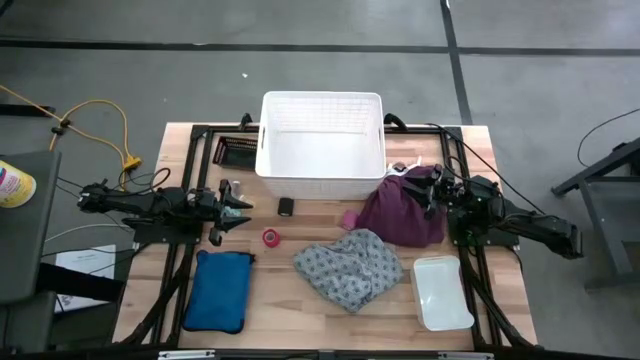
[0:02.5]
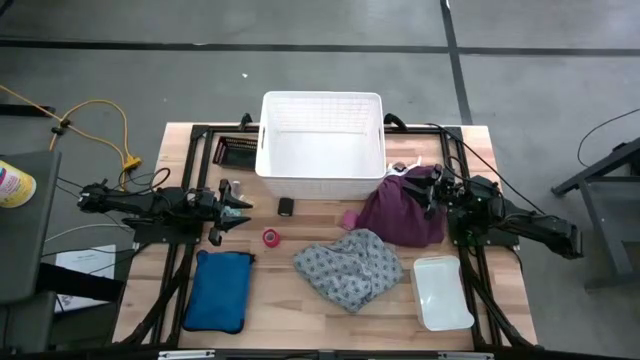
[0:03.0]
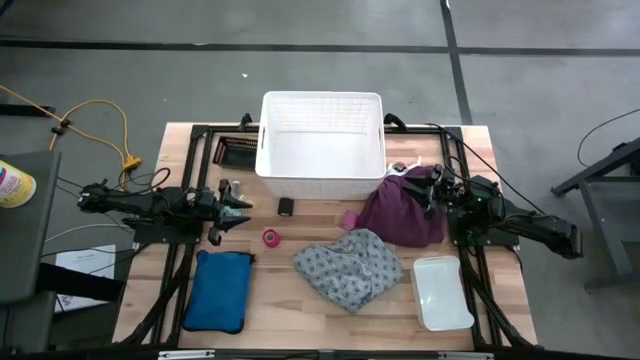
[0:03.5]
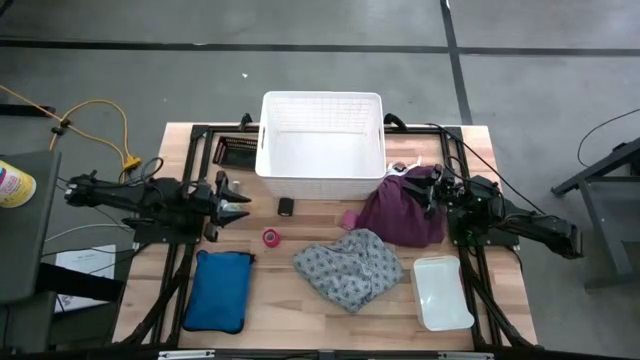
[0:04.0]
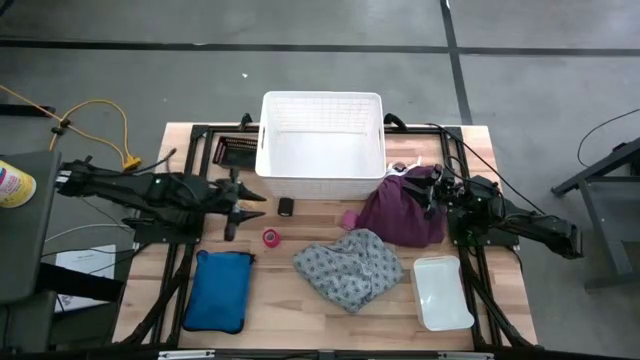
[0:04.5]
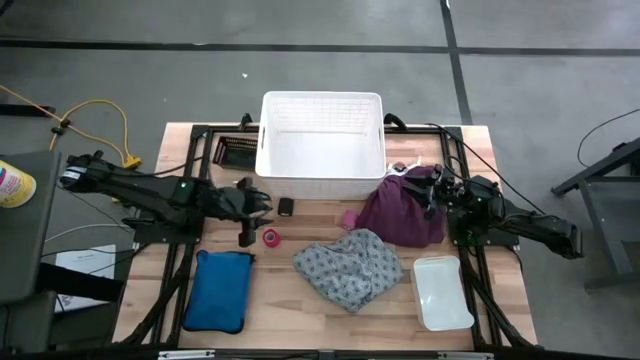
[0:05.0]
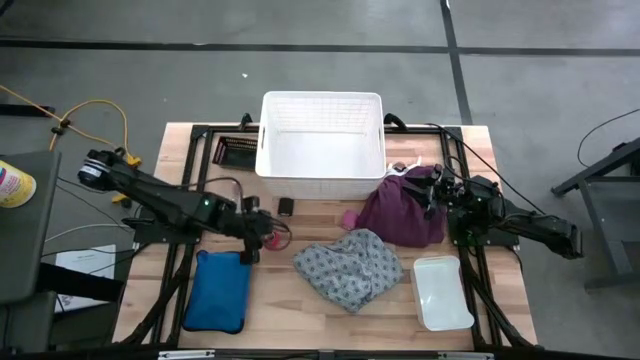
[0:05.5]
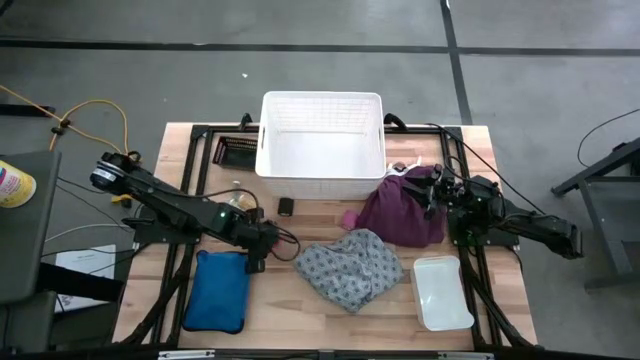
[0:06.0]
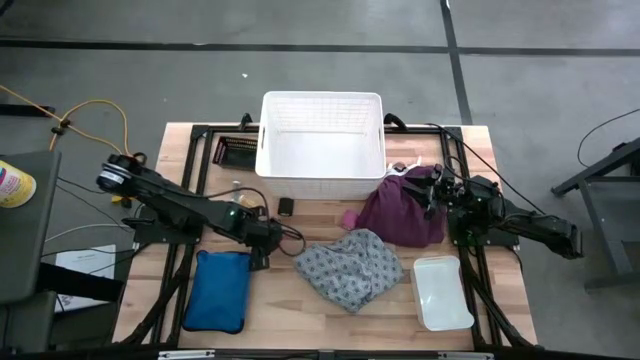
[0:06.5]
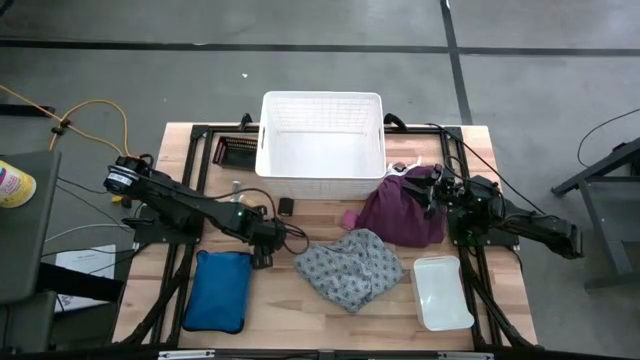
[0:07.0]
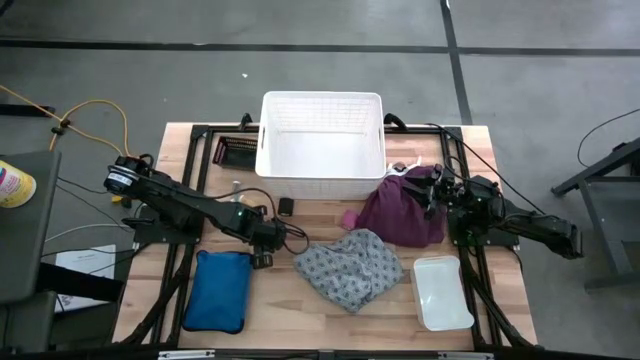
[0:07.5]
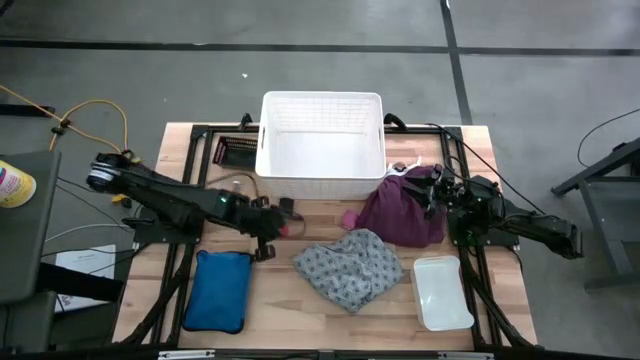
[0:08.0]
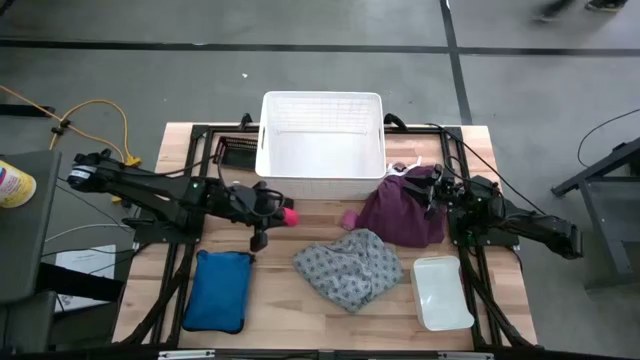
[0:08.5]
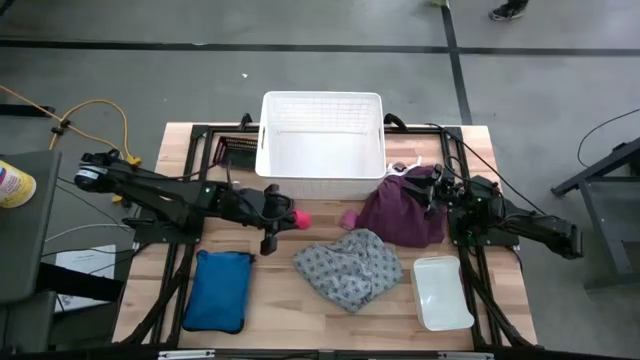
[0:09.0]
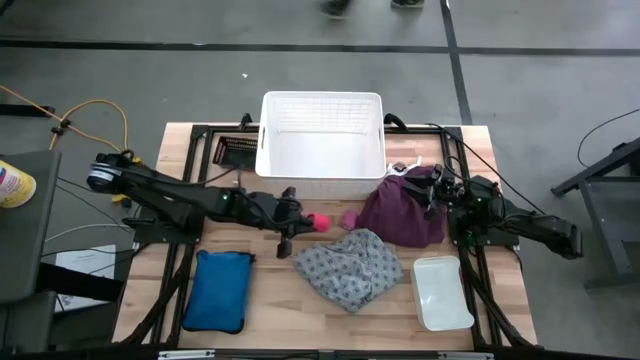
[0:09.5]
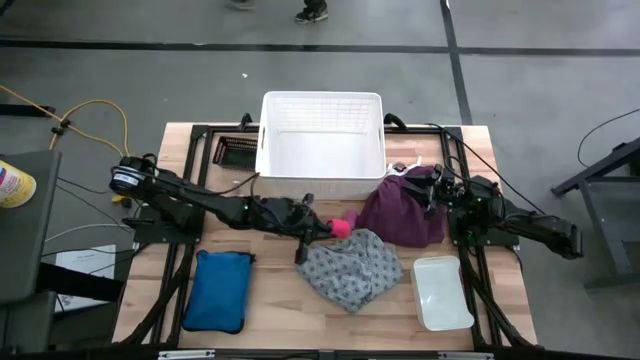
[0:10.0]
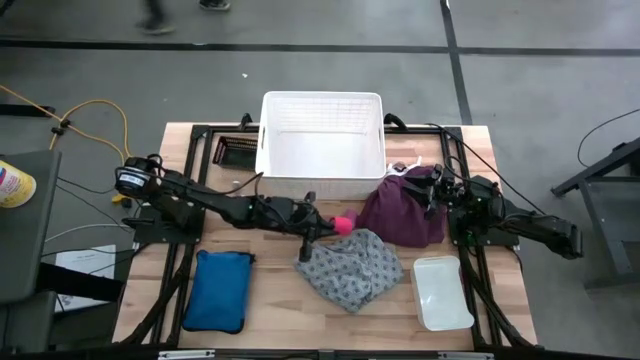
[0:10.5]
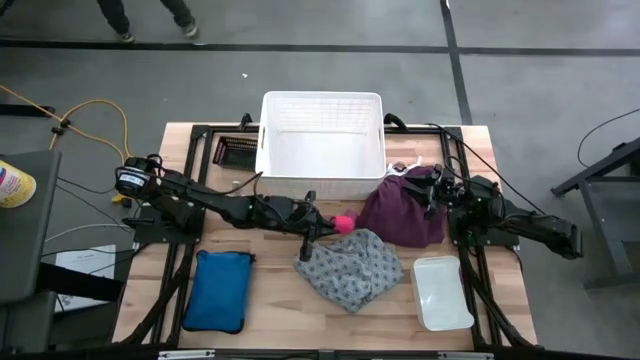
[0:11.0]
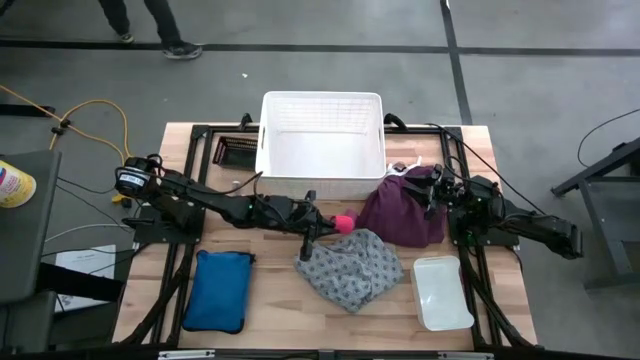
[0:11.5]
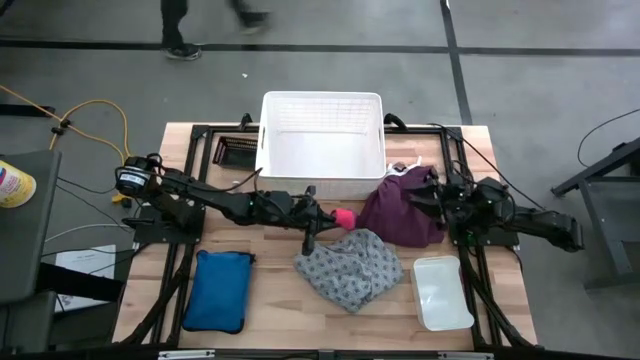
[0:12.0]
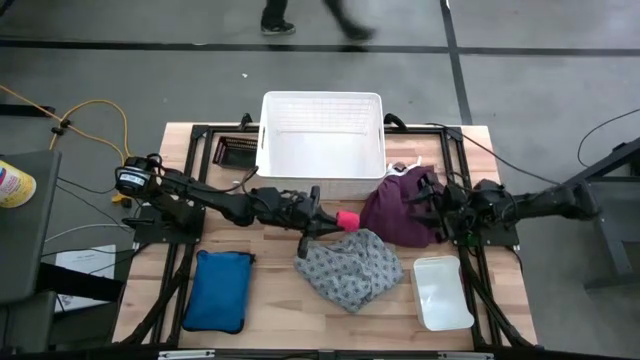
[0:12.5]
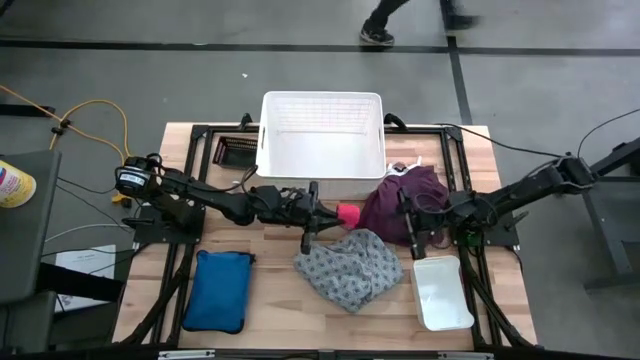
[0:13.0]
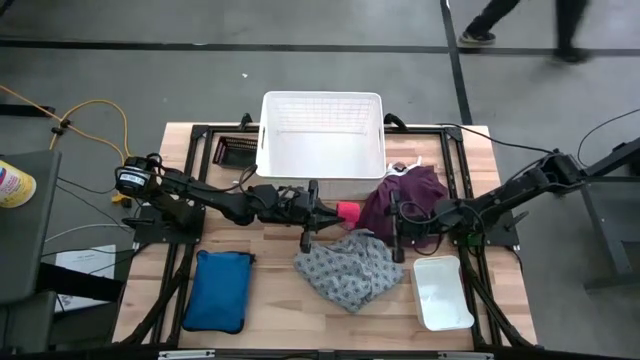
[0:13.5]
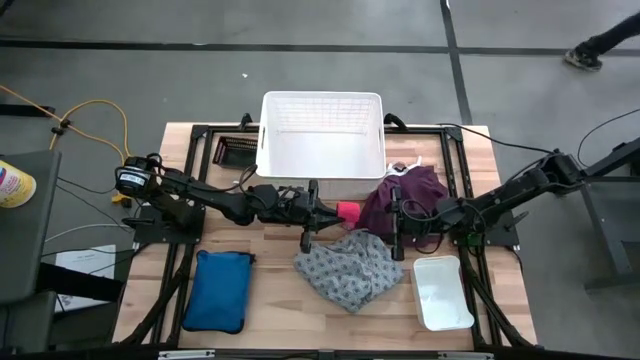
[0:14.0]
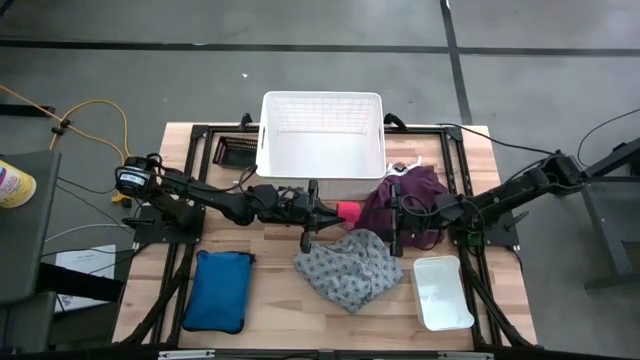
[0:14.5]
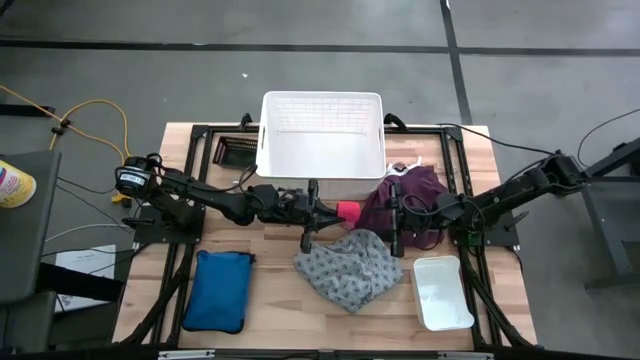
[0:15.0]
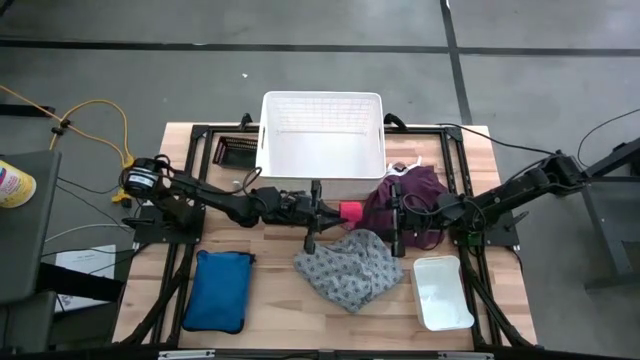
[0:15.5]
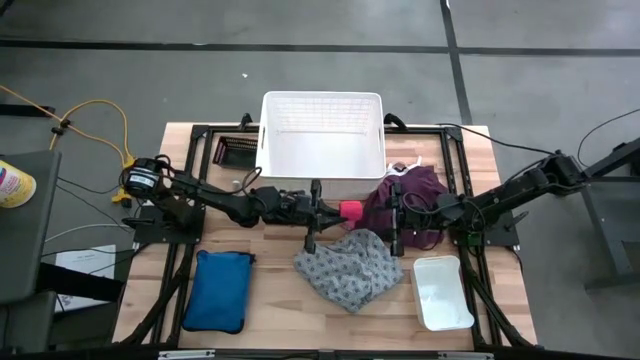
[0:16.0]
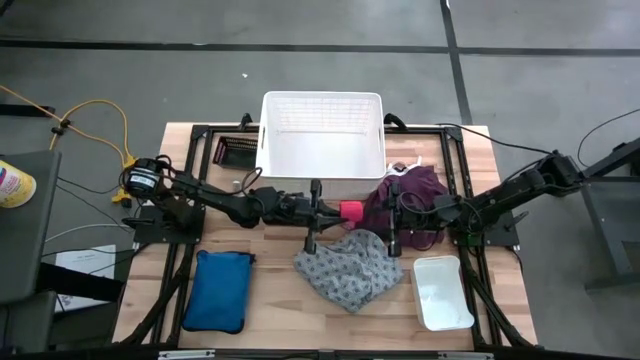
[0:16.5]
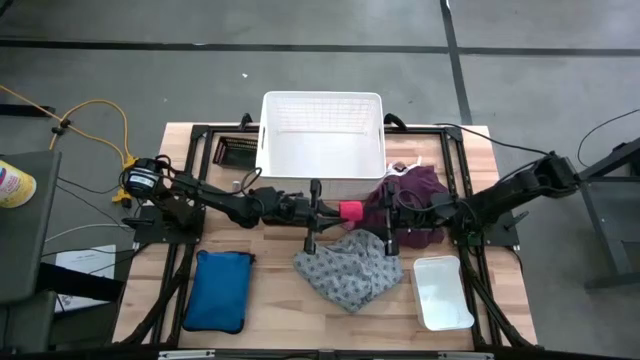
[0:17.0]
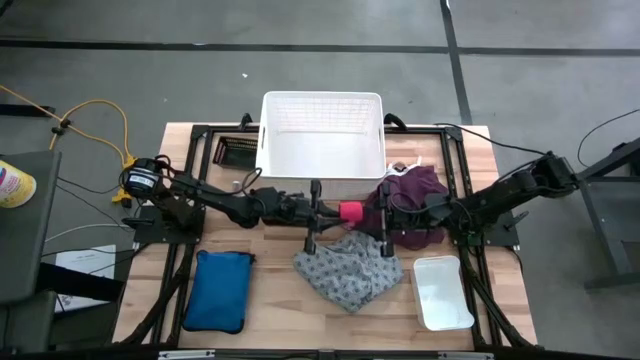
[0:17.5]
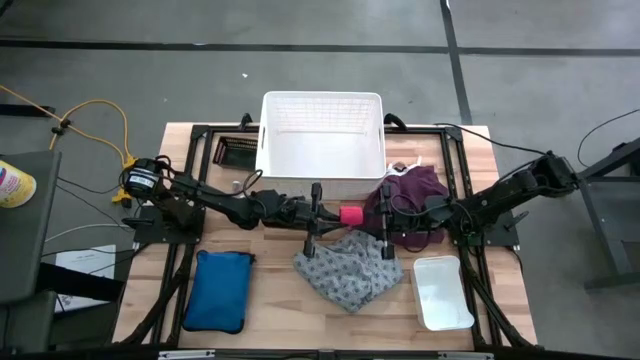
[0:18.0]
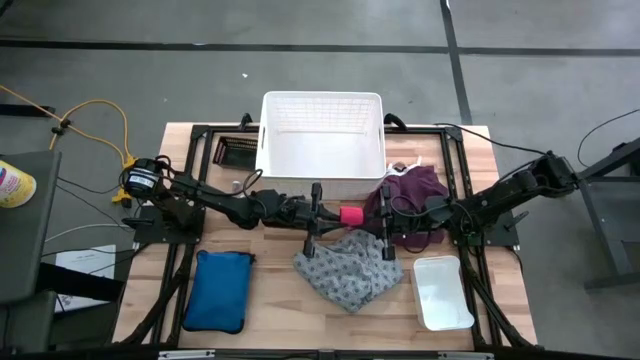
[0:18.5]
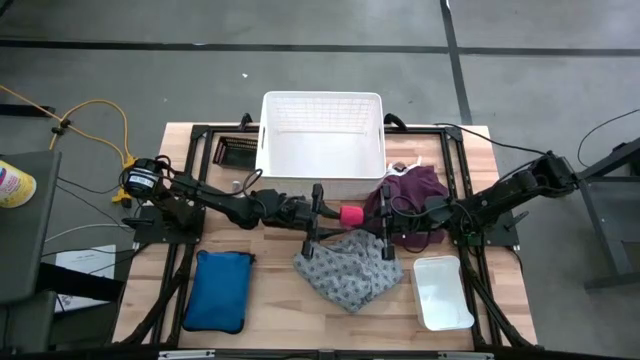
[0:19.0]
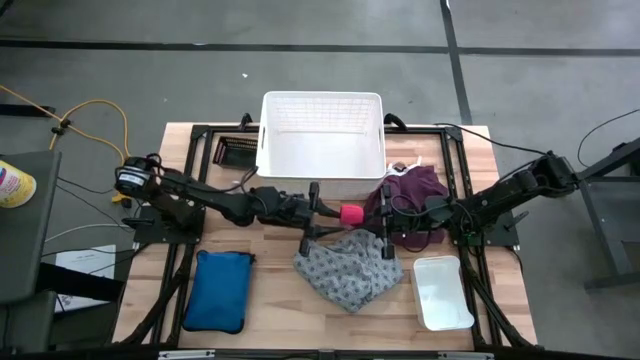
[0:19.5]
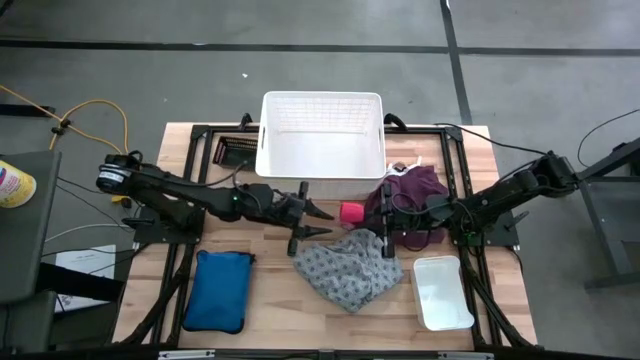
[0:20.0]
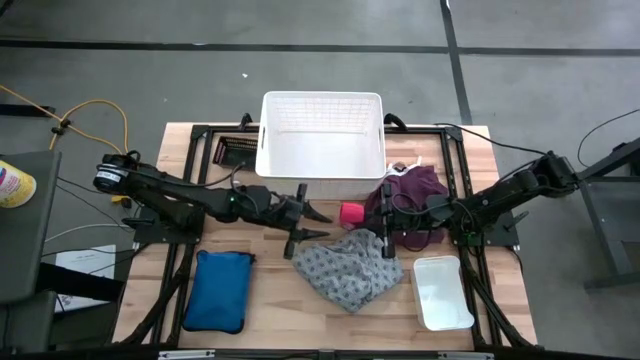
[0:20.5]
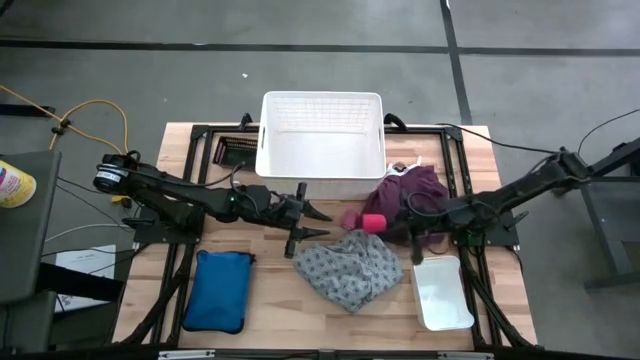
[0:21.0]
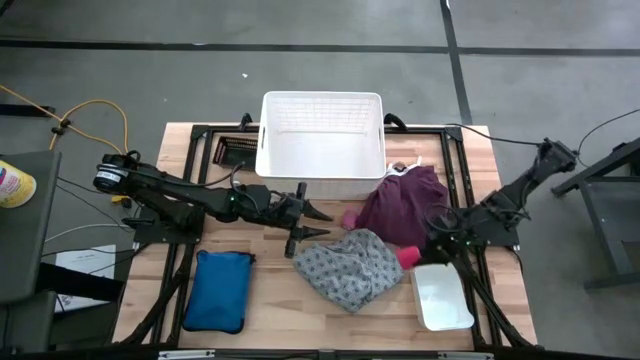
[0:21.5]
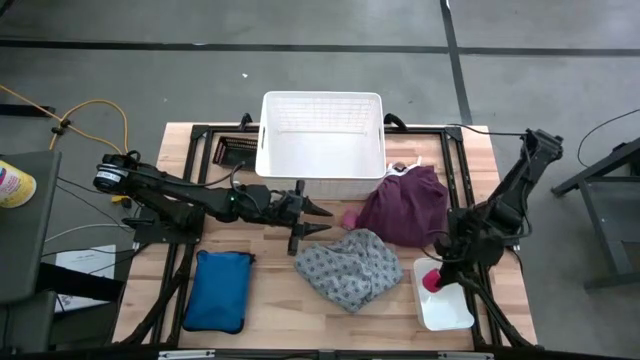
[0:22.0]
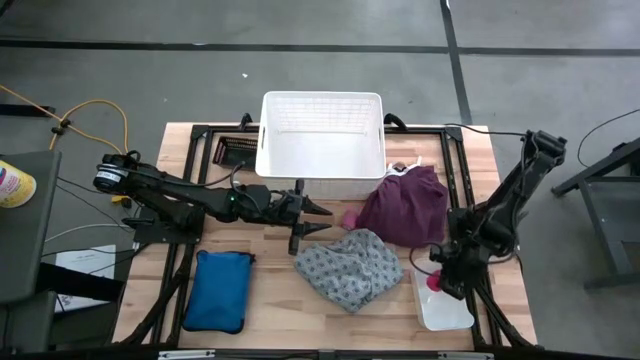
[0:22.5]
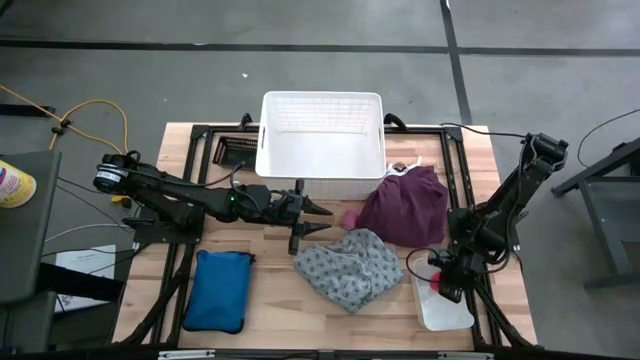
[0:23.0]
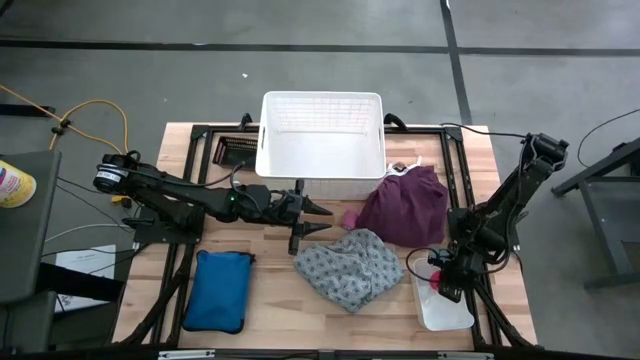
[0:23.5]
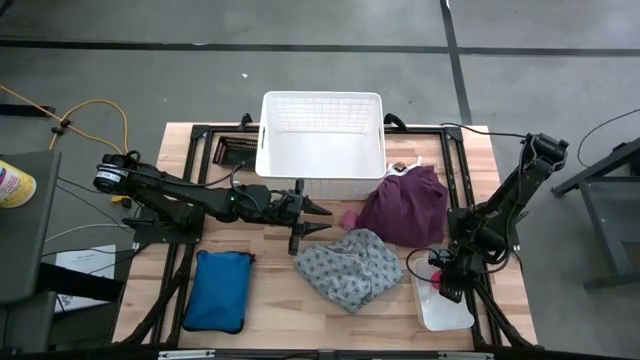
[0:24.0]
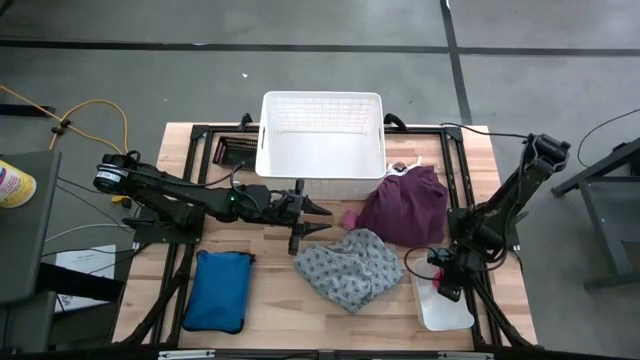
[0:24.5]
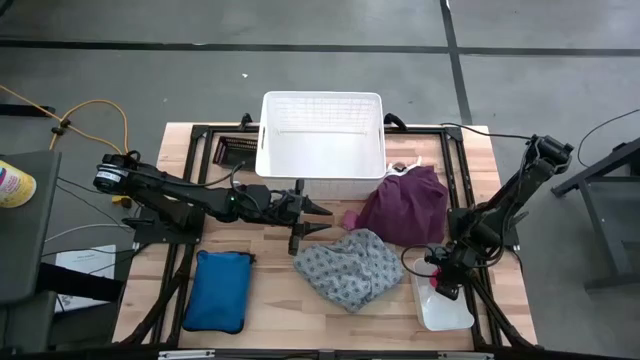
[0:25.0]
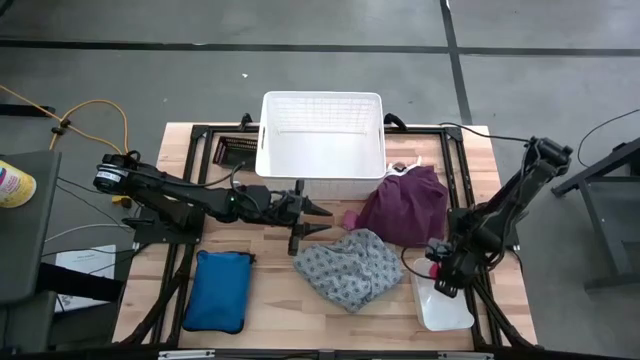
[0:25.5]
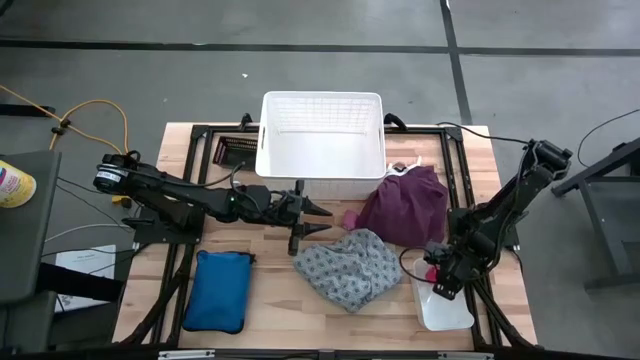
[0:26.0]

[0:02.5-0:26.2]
Task: Pick & place medical supplies in basket/bin
Put the red bandage into the small white bin
